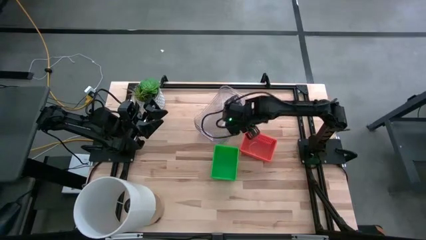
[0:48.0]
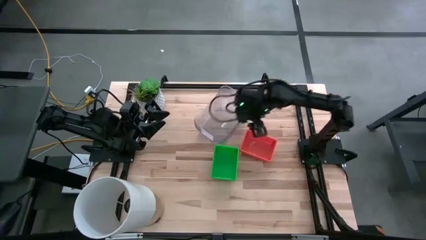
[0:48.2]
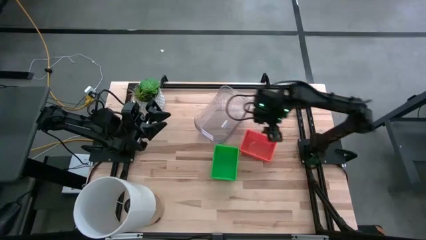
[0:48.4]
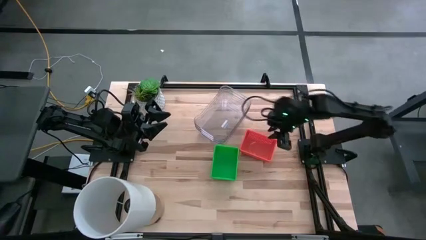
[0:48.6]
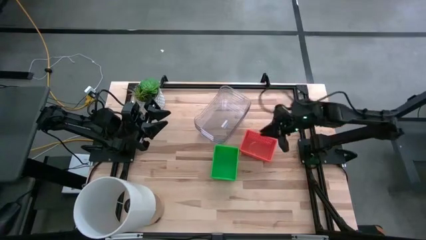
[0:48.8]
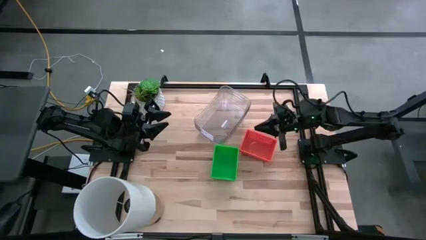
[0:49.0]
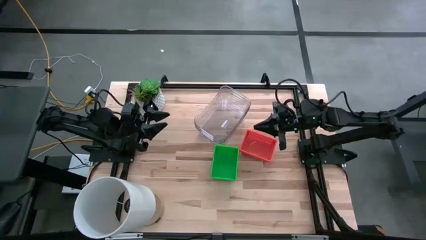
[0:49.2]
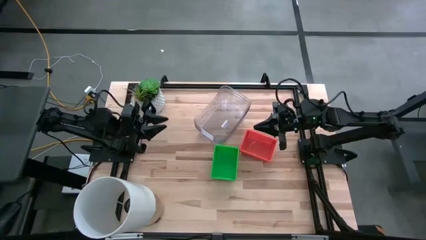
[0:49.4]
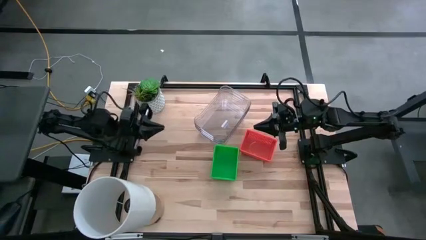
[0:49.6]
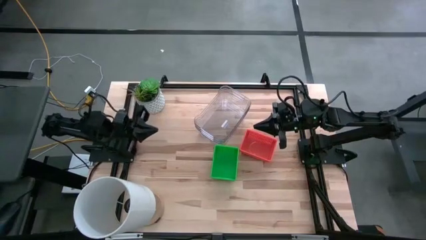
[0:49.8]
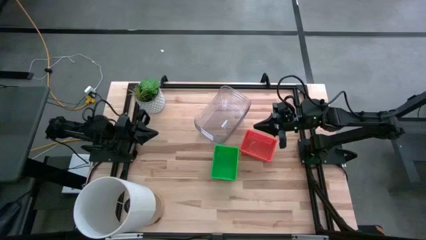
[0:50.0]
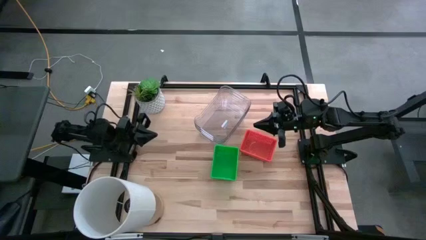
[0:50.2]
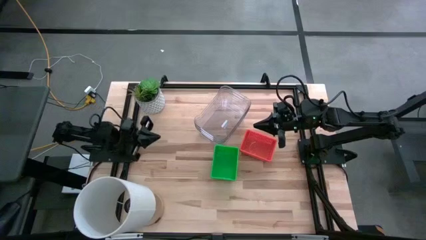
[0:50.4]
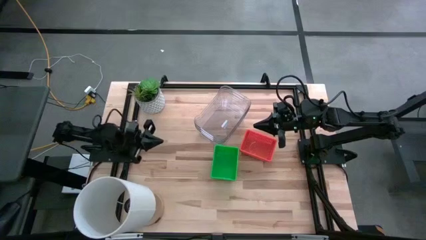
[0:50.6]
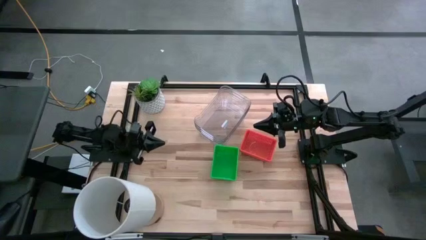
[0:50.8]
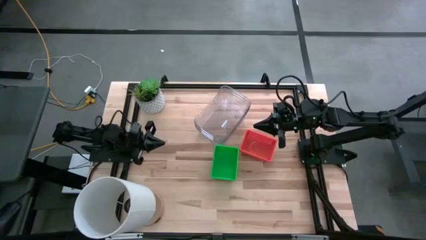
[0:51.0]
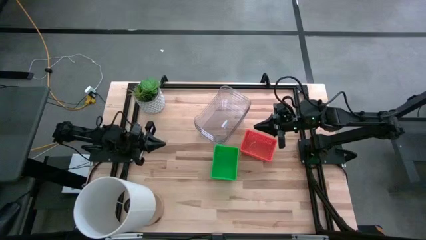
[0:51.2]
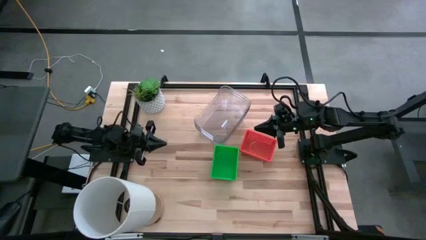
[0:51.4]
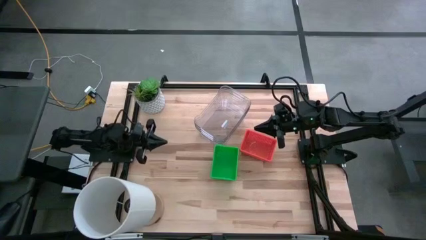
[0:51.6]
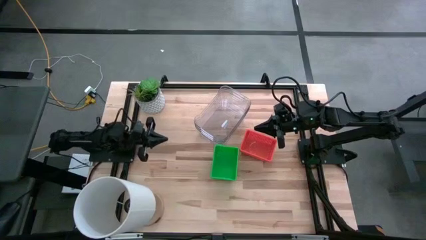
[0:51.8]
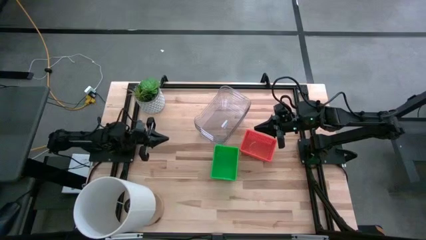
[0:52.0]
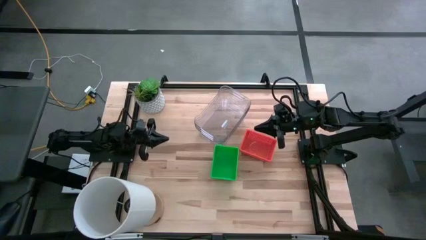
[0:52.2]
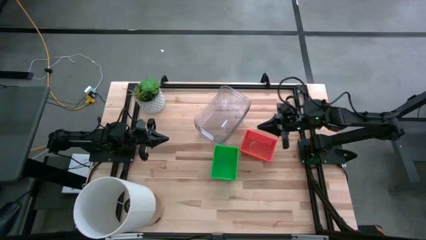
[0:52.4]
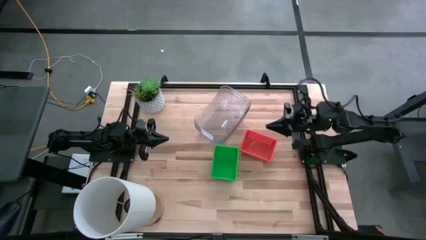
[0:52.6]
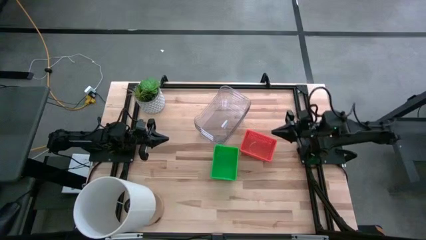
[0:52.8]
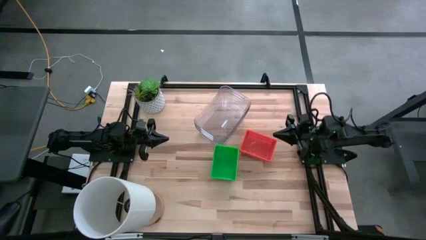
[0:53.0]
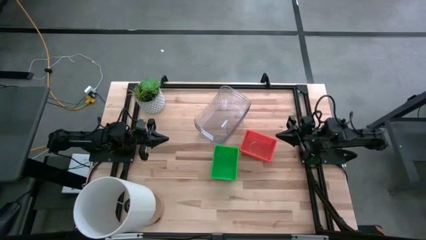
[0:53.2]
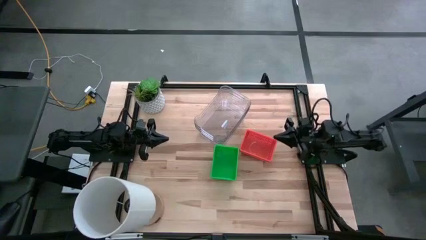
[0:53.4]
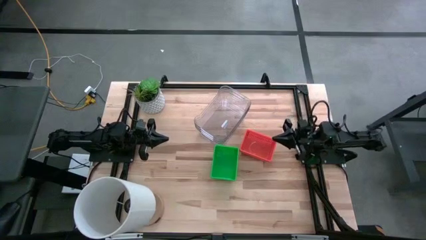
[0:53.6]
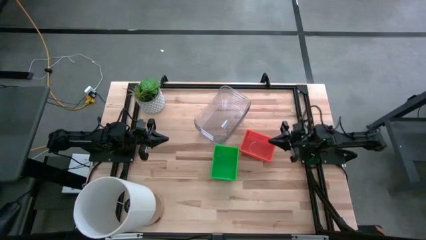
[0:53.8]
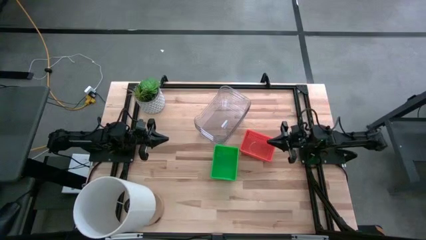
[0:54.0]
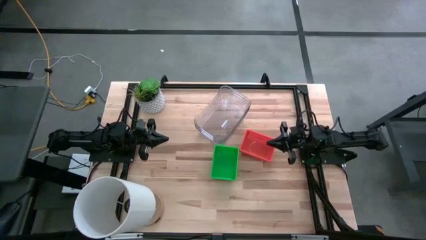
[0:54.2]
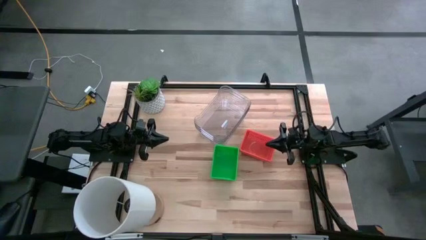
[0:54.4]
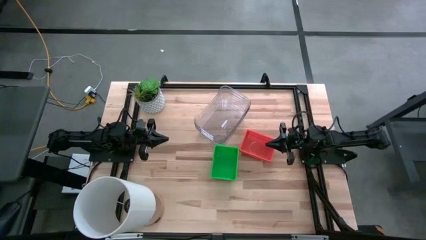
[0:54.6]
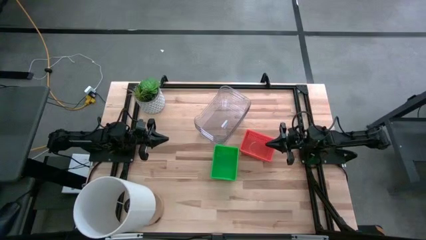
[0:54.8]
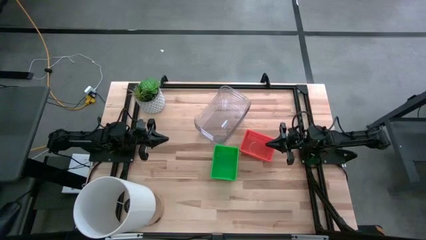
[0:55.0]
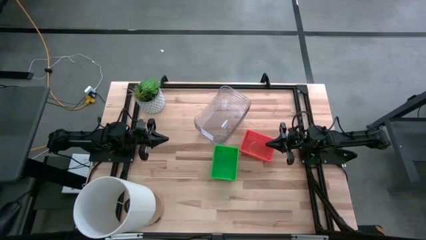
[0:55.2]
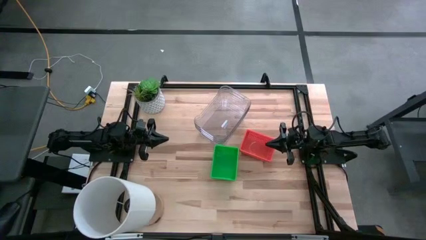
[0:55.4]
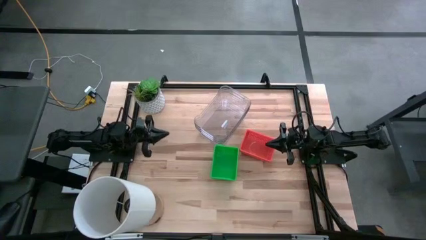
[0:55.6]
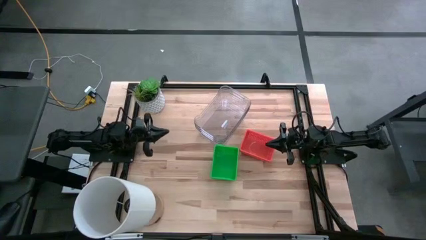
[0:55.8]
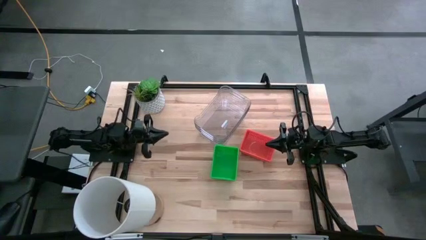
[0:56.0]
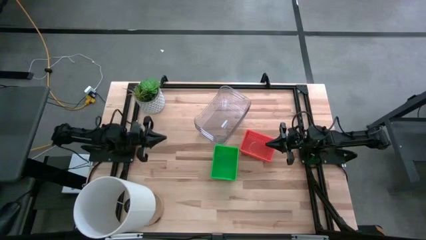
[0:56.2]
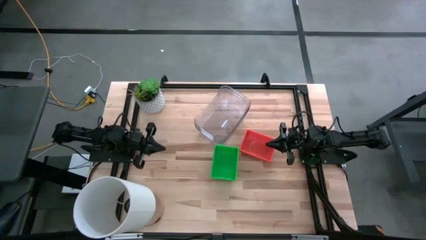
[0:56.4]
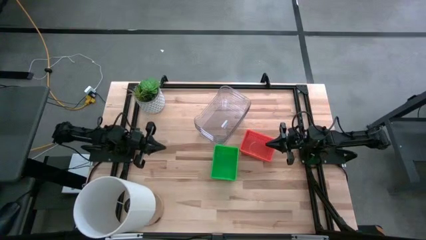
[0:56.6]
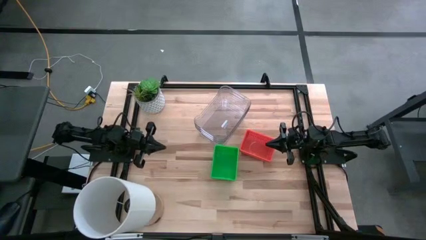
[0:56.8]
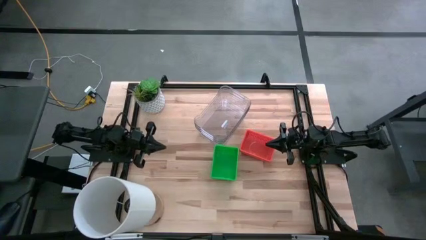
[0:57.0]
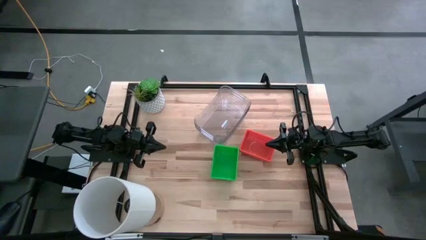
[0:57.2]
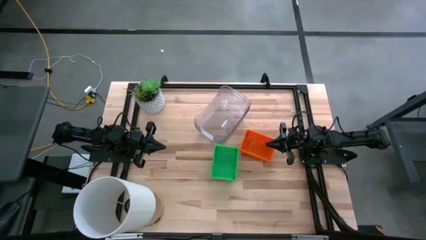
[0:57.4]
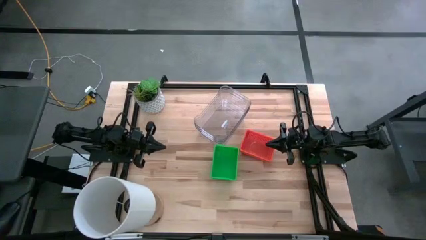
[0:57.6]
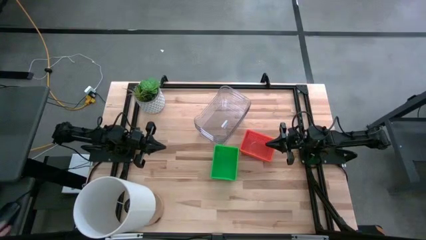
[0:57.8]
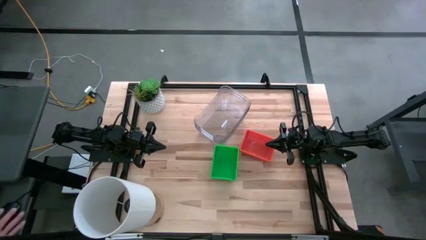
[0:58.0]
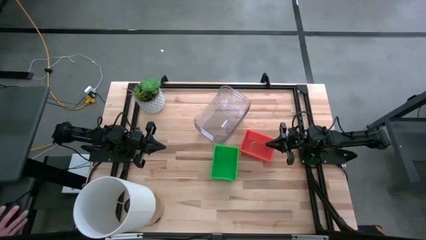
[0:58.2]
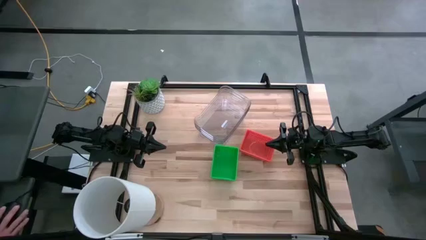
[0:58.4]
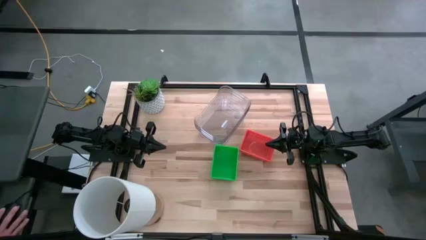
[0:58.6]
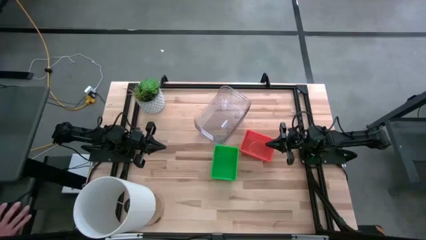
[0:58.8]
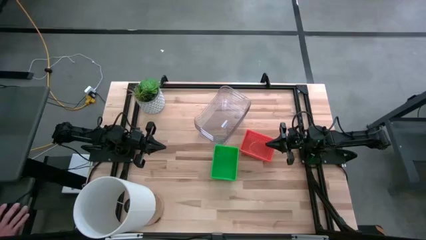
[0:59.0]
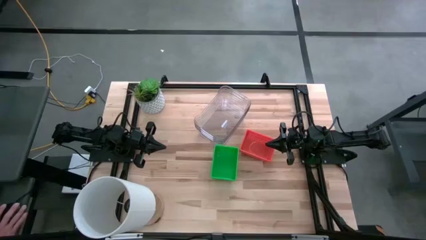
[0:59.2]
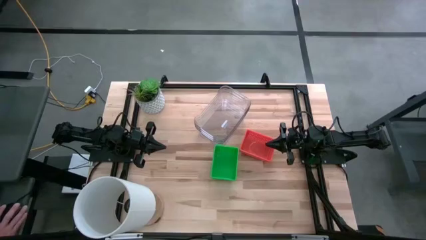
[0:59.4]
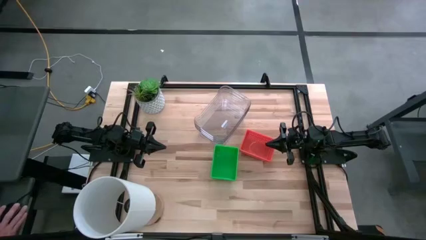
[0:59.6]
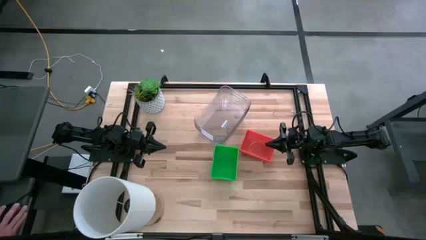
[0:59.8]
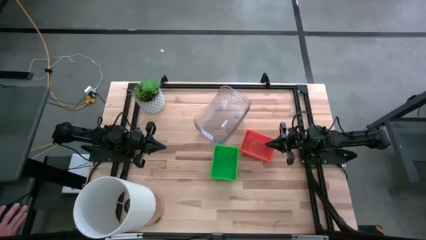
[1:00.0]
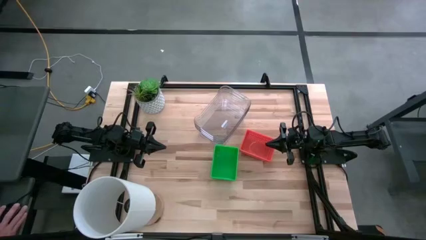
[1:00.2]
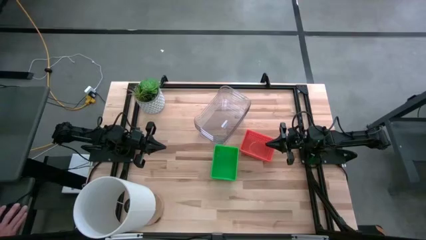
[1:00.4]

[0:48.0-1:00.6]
Return to Home Position

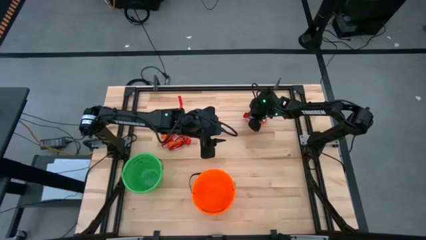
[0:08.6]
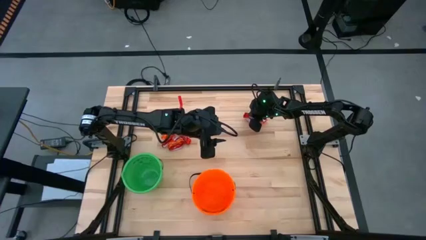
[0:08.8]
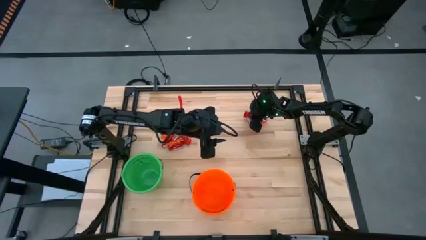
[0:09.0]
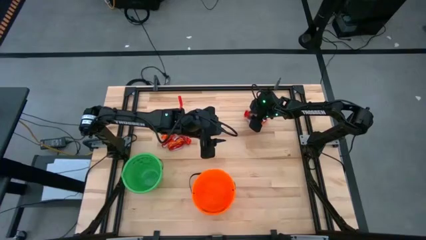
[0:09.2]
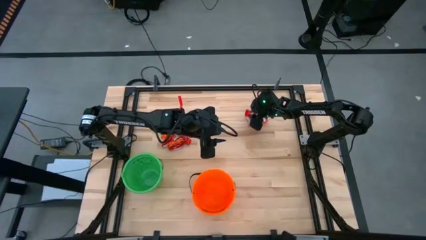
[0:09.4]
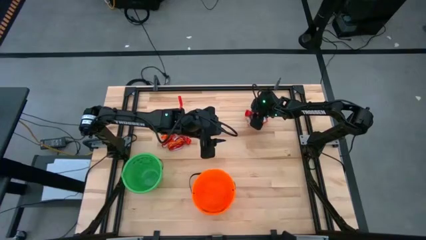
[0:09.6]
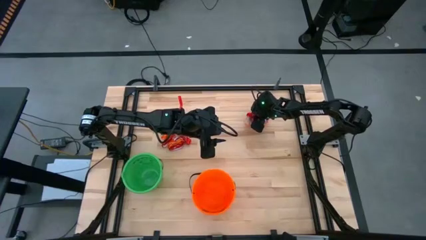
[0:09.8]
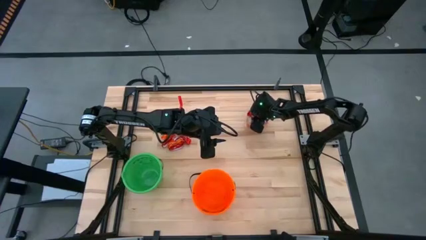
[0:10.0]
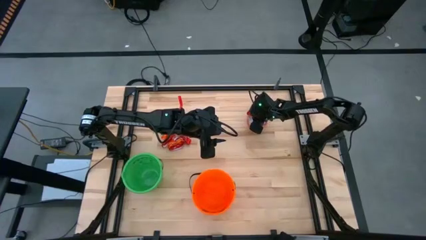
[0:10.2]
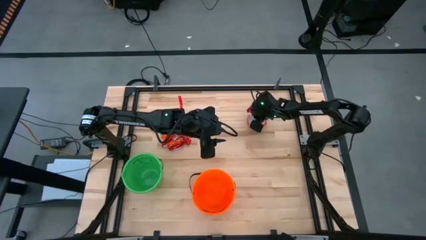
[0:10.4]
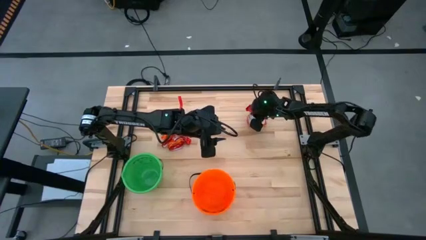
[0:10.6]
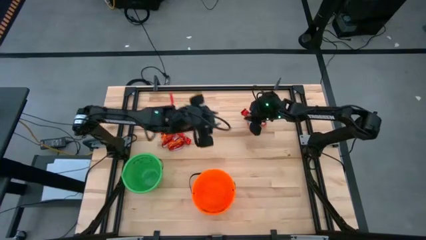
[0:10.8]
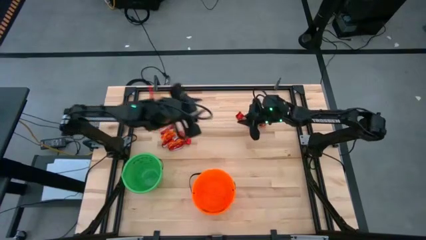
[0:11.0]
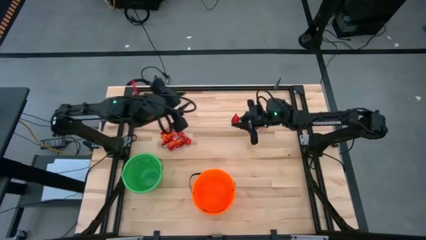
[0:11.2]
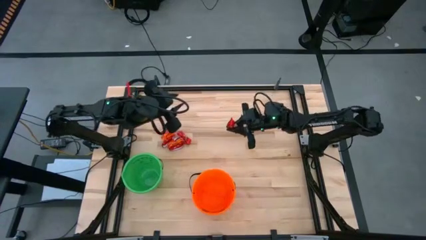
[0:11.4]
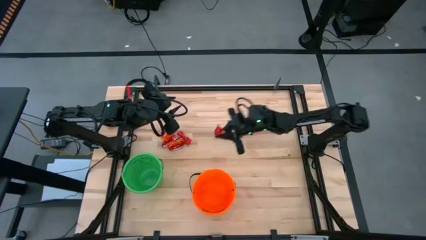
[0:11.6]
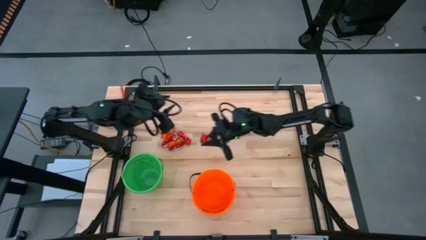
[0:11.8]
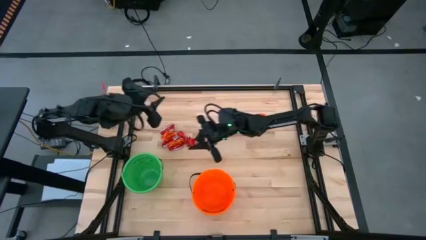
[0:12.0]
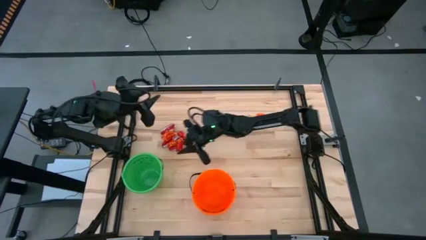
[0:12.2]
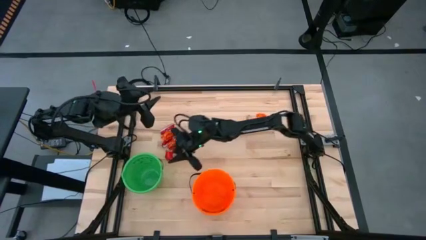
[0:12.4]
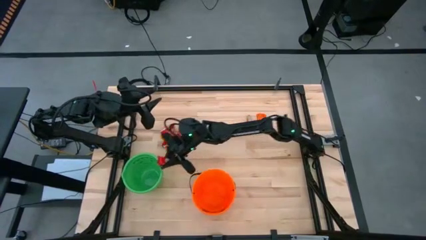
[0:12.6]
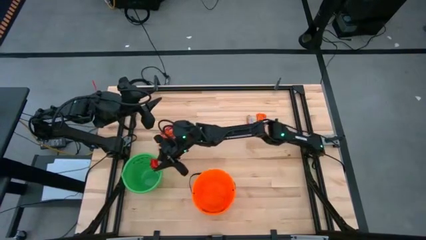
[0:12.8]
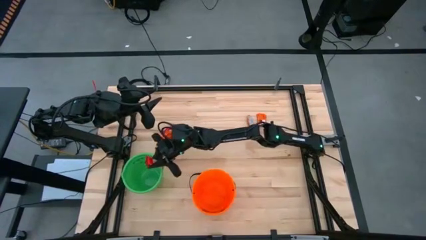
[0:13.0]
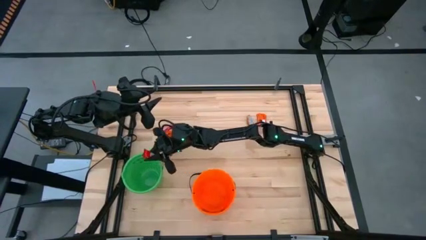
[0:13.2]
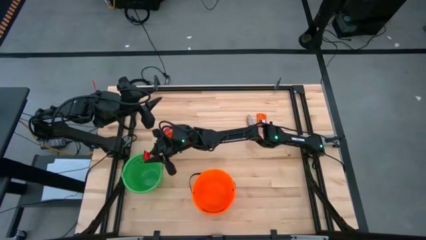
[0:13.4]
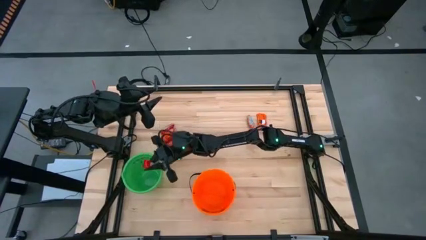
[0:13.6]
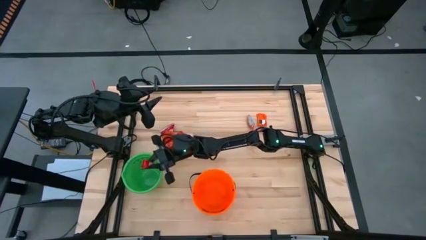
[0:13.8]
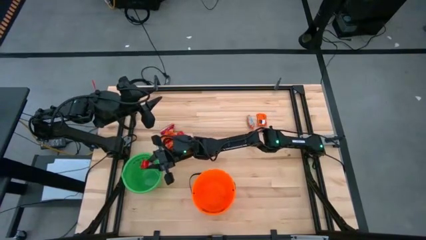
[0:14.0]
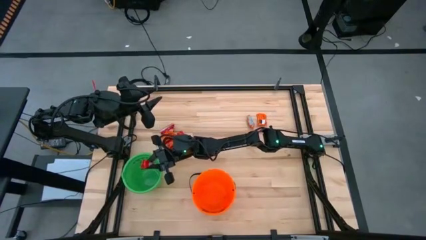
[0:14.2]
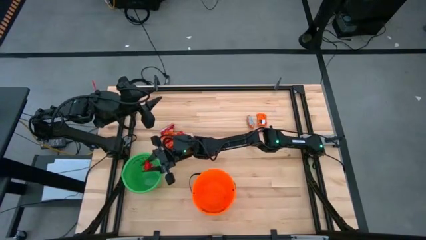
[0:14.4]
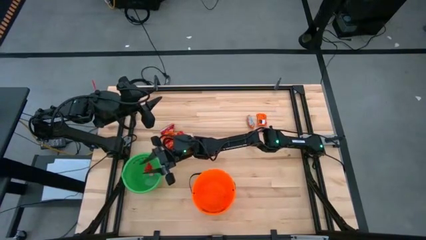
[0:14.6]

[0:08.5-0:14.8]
Put the red chocolate into the green bucket
